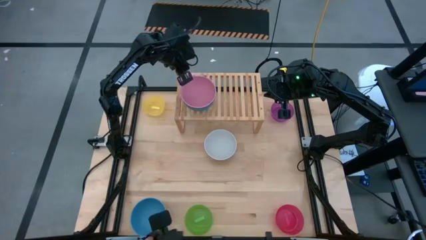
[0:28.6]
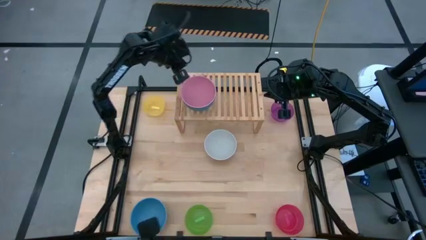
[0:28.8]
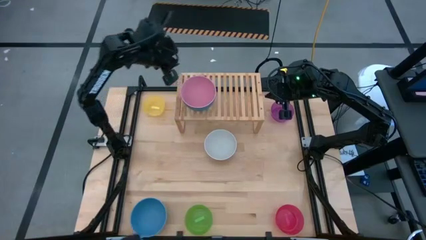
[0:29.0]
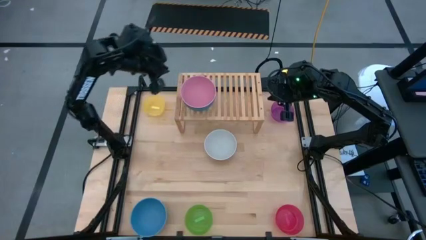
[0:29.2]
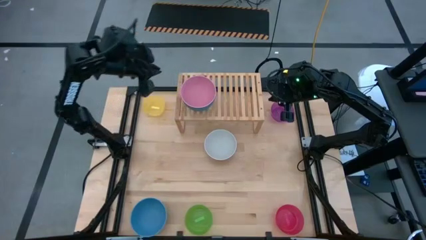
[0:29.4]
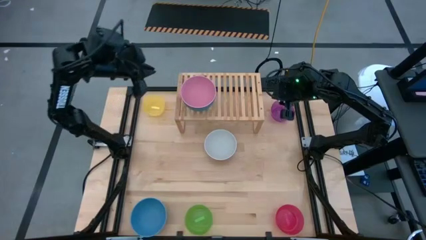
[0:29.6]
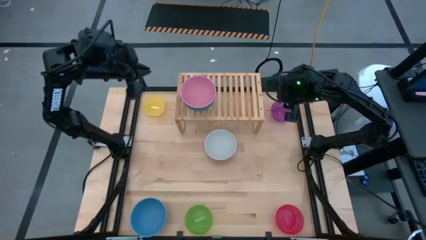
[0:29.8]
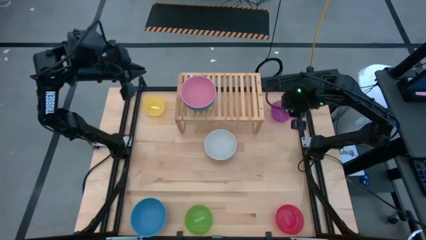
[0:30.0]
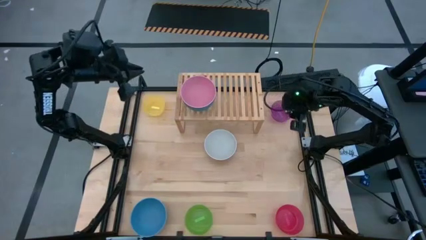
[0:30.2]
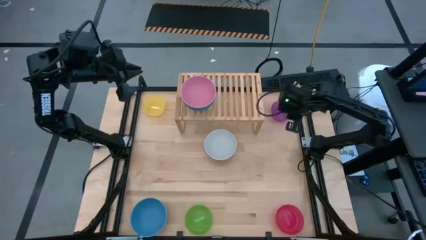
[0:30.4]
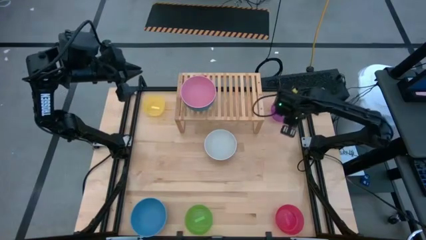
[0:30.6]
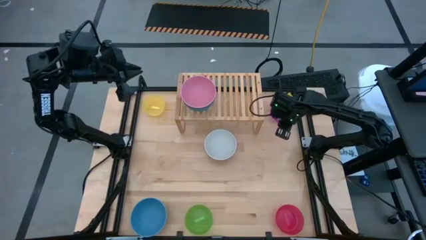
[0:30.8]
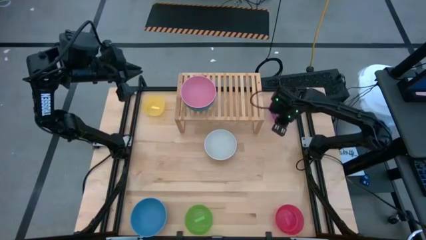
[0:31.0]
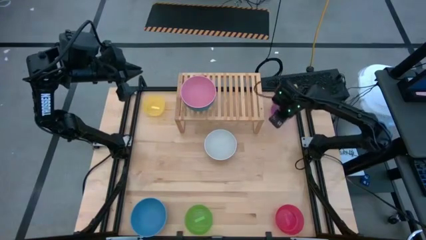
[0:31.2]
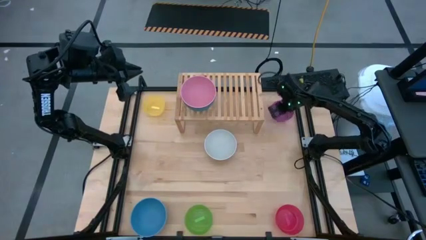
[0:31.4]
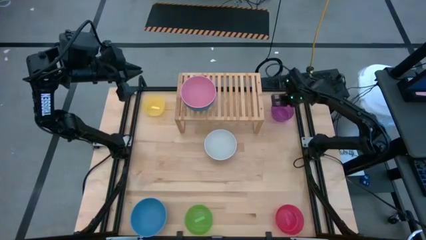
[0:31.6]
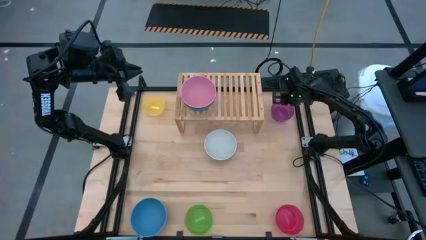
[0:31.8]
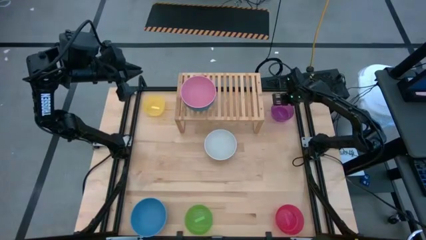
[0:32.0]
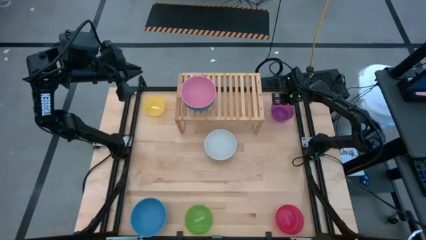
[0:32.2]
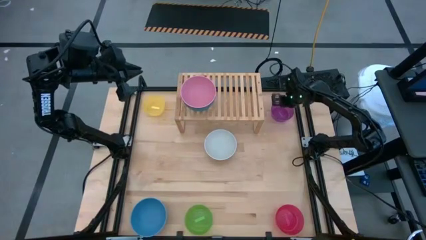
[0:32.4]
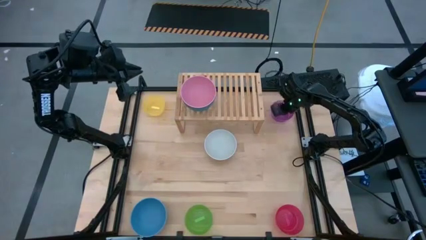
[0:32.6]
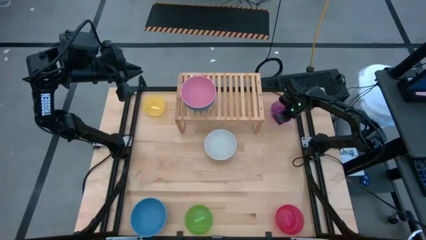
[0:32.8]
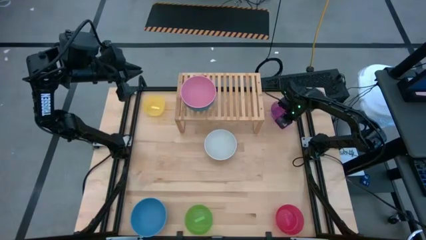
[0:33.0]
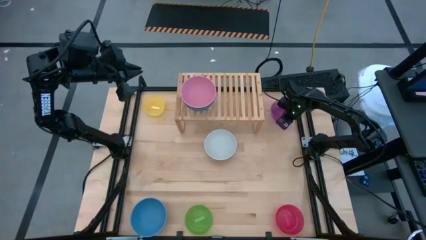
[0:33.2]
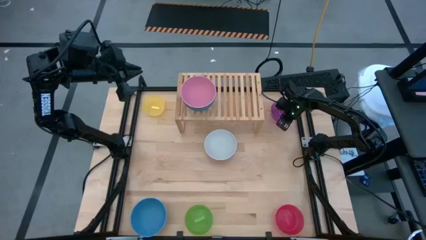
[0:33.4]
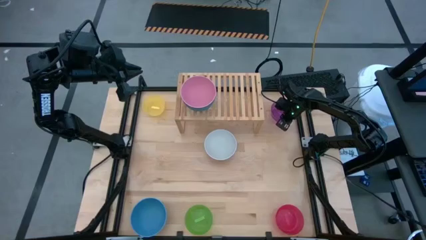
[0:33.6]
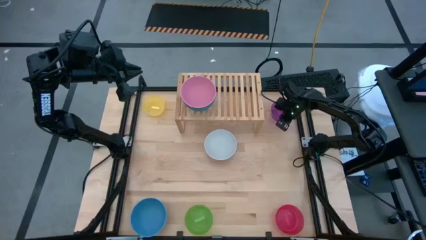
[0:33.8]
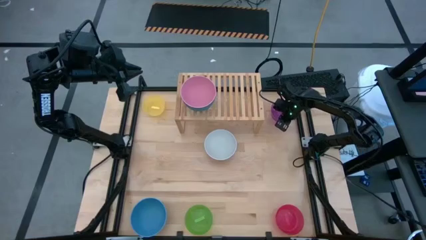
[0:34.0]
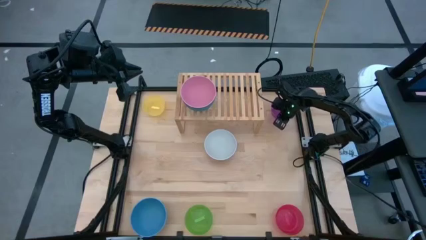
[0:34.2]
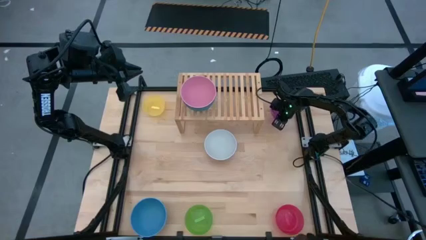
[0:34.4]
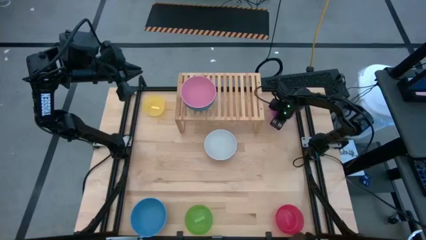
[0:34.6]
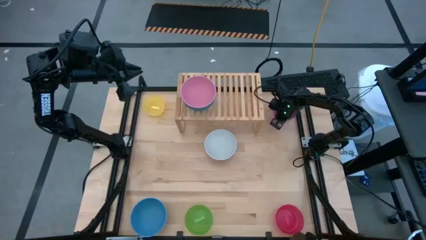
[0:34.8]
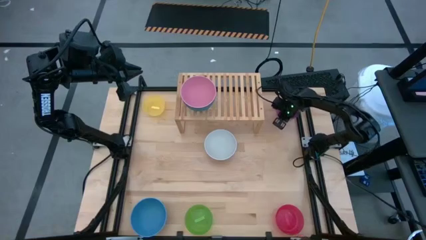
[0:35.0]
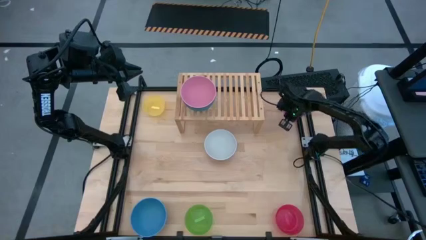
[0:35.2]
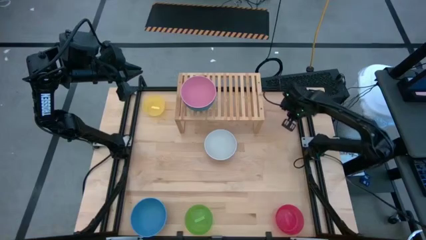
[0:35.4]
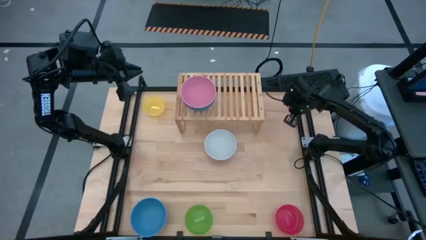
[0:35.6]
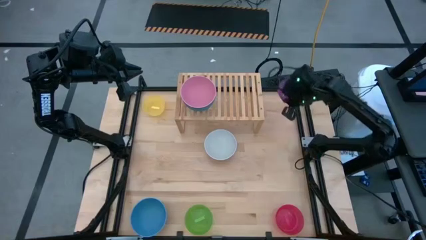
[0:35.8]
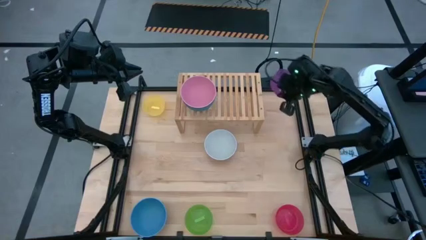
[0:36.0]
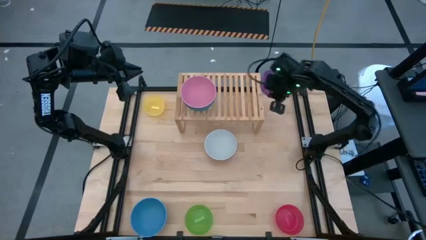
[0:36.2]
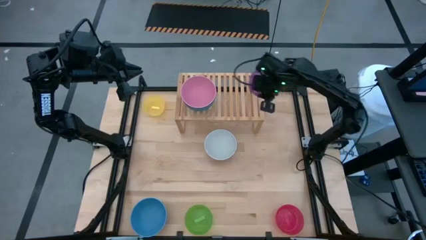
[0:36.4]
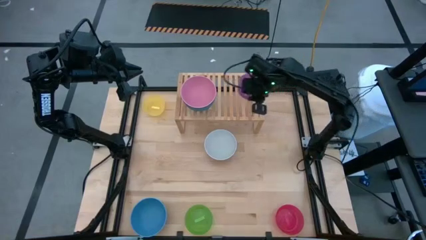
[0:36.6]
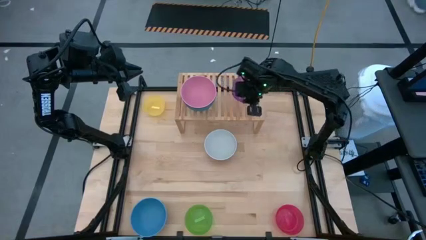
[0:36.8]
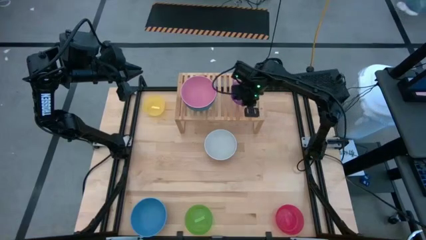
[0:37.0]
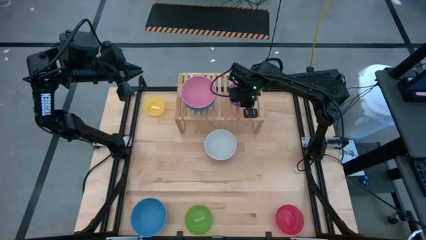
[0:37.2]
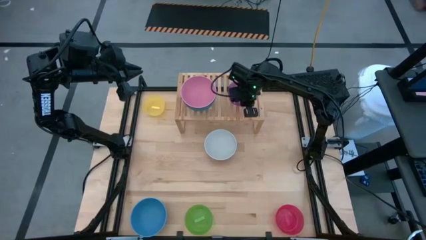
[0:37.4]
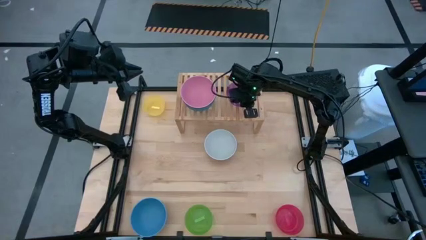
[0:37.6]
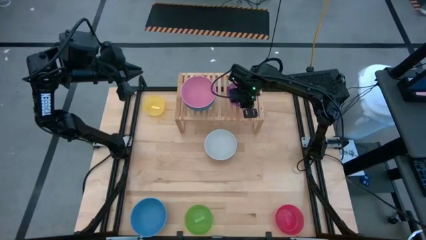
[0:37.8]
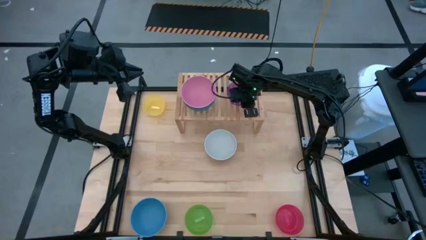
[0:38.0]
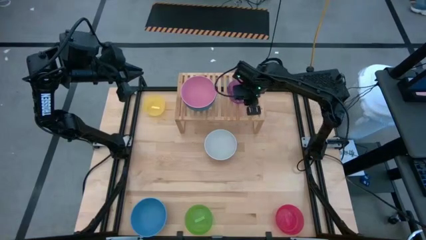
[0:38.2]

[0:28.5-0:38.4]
Task: Place and stack bowls onto a shelf
Put the violet bowl on the shelf

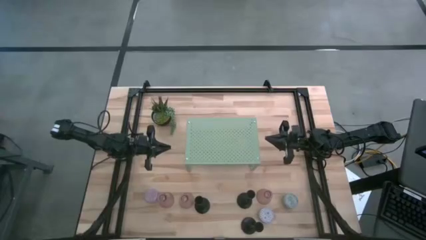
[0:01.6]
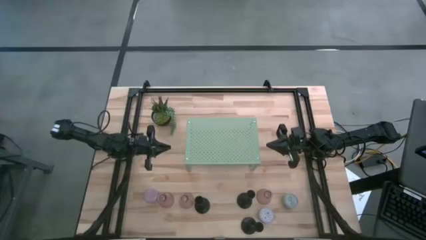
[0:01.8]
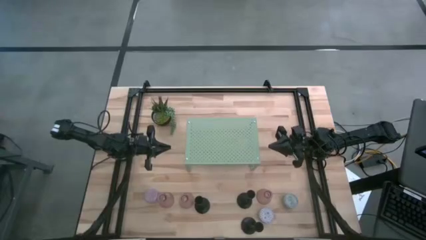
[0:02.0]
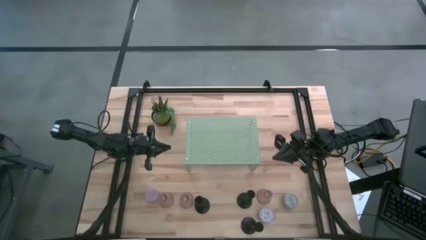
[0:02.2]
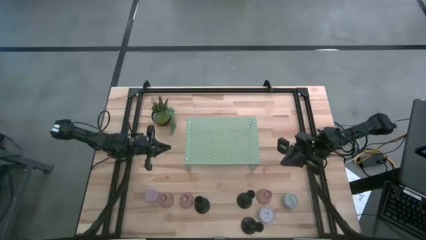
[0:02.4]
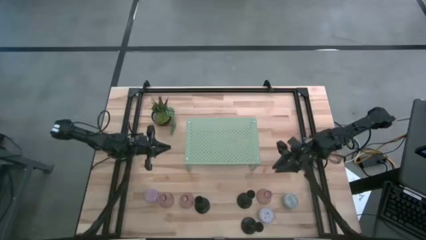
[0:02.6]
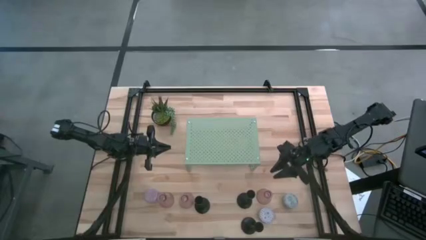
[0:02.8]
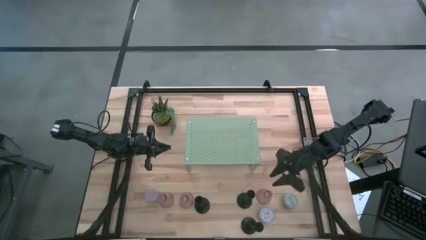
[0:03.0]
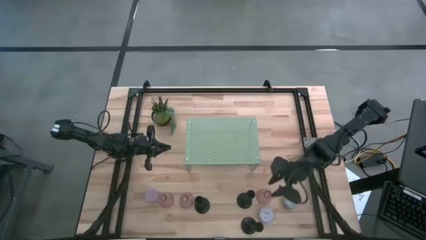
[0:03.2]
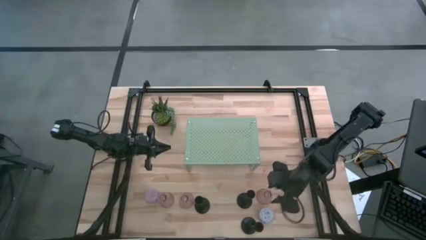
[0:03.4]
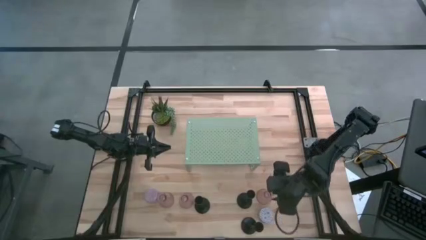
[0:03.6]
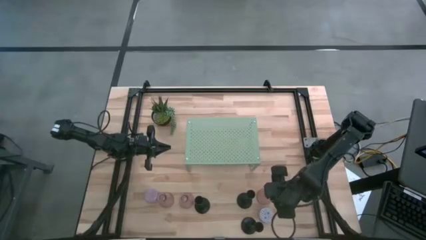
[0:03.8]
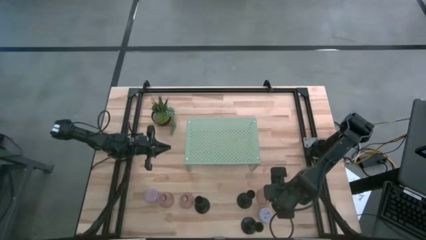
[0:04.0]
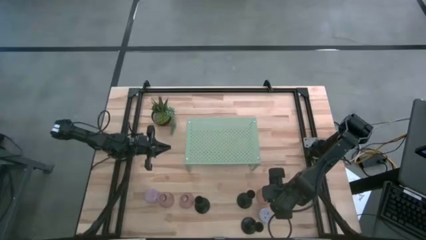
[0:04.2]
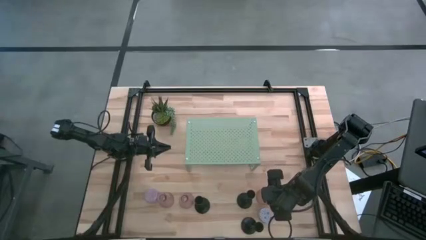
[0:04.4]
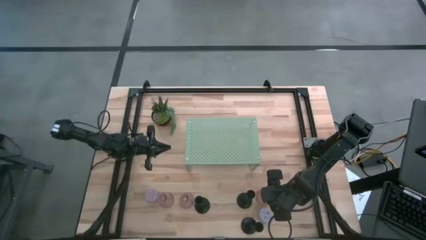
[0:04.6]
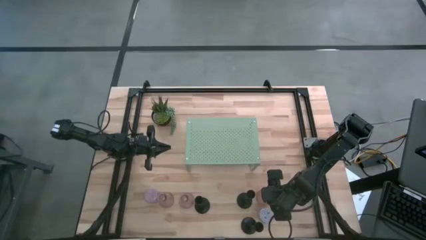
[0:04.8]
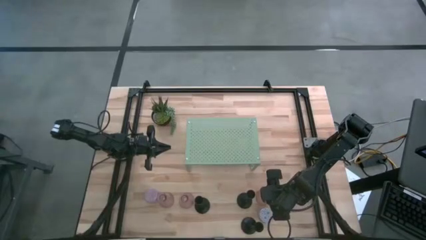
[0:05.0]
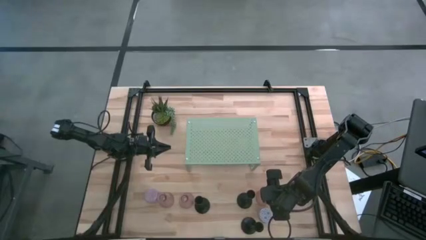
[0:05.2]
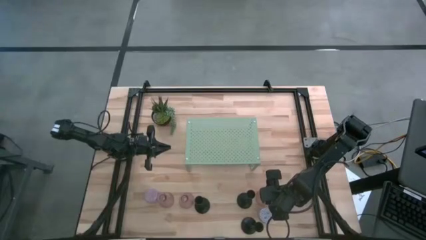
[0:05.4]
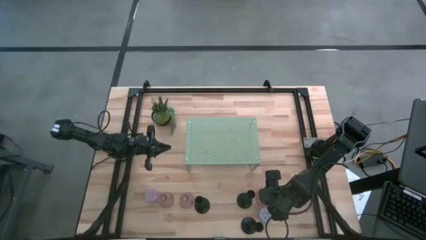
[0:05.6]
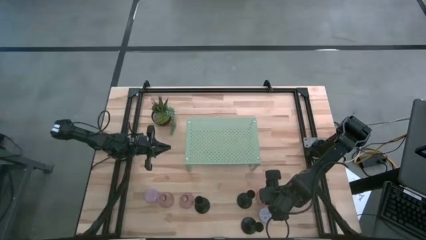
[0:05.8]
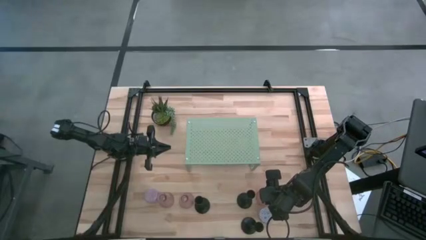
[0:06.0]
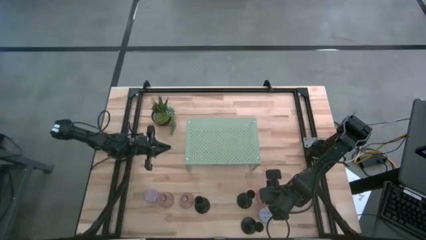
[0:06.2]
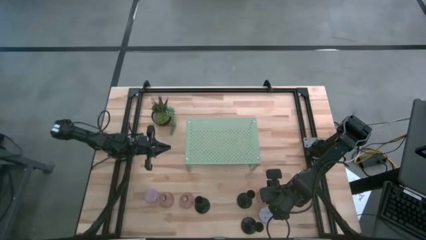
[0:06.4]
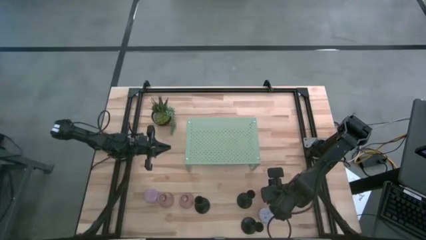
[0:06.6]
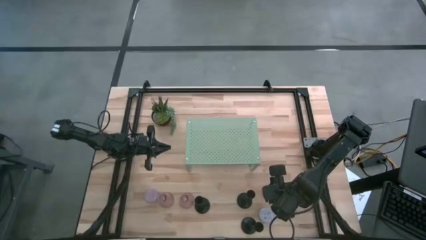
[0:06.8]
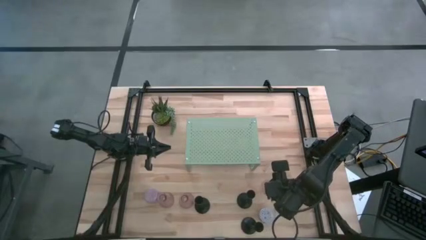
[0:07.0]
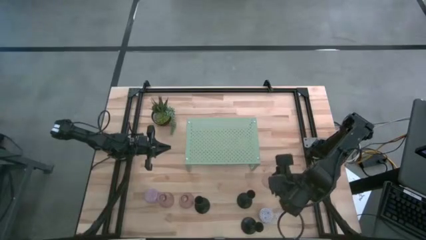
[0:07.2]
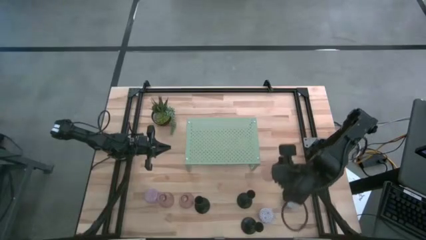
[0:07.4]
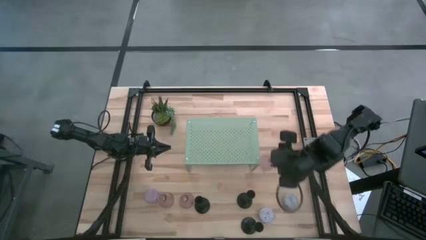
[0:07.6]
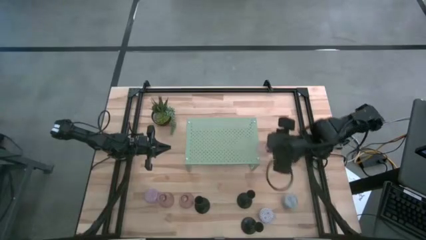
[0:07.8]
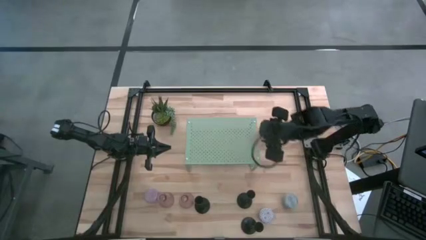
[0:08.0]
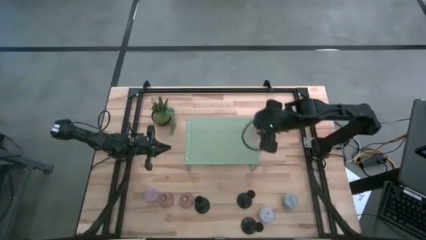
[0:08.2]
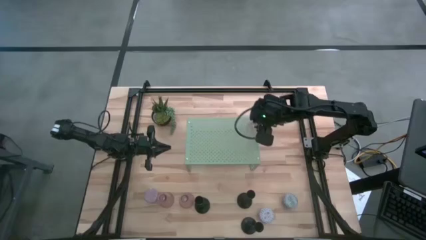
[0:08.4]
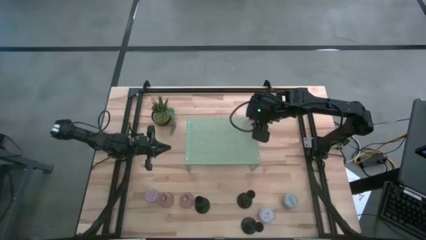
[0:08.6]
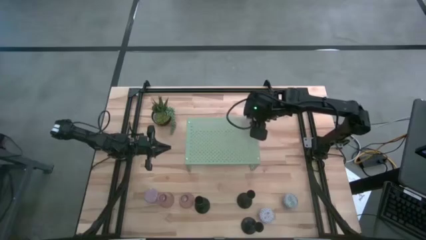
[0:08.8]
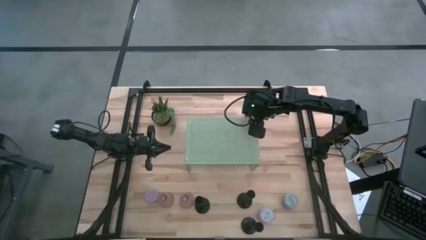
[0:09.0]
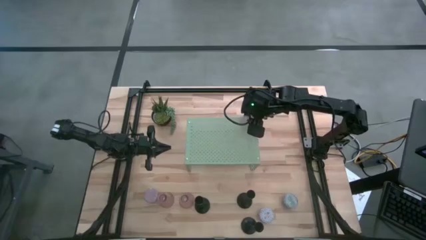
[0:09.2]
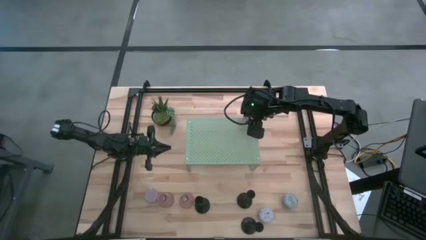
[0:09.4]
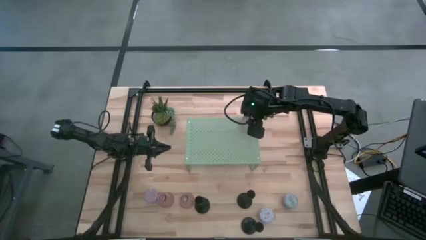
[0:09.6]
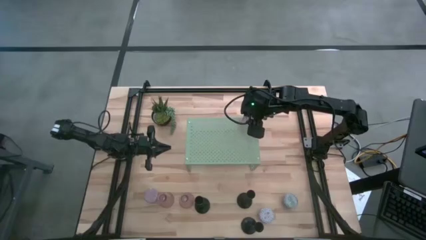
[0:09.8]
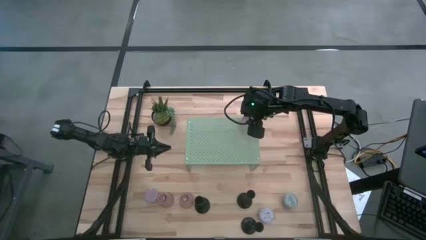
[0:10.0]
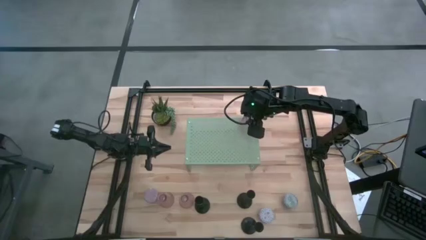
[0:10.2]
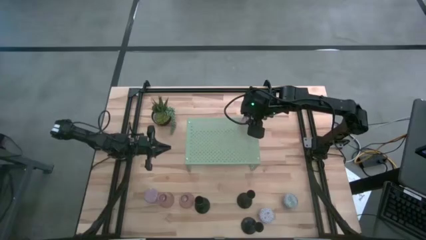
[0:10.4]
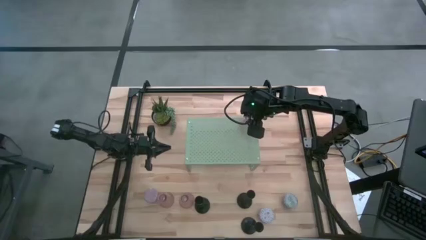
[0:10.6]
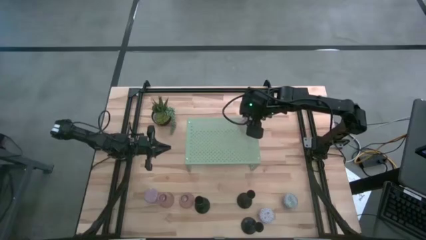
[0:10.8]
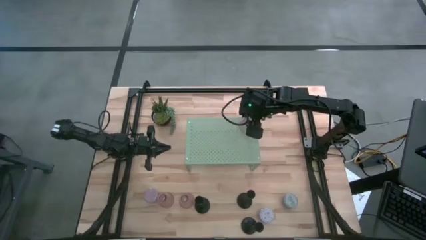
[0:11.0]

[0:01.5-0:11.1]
Task: Pick & Place candle stick holders
Put the right glass candle holder on the shelf
